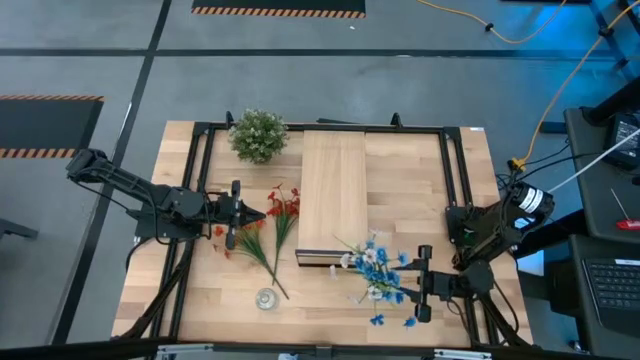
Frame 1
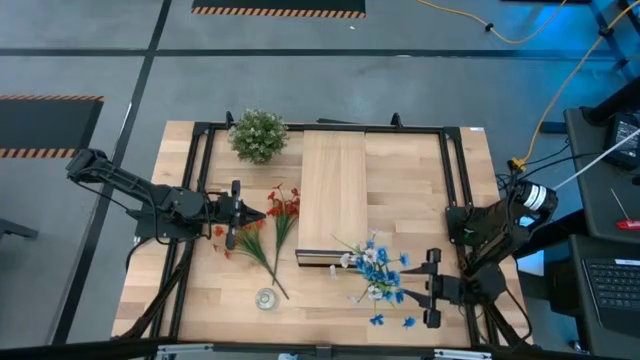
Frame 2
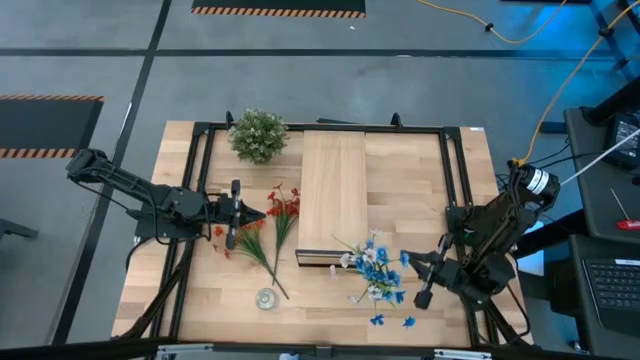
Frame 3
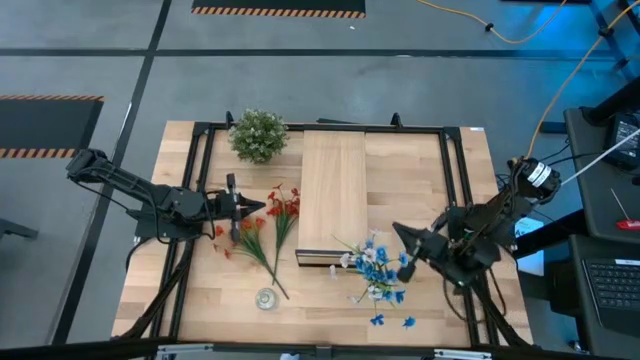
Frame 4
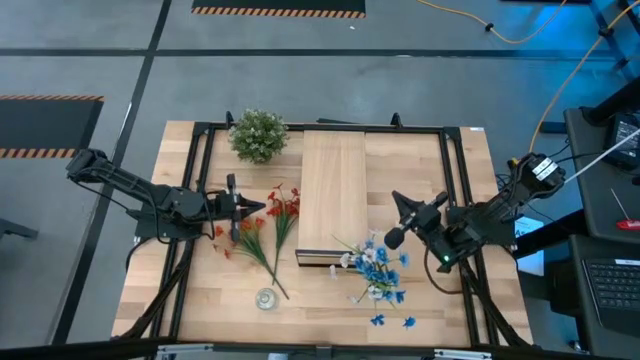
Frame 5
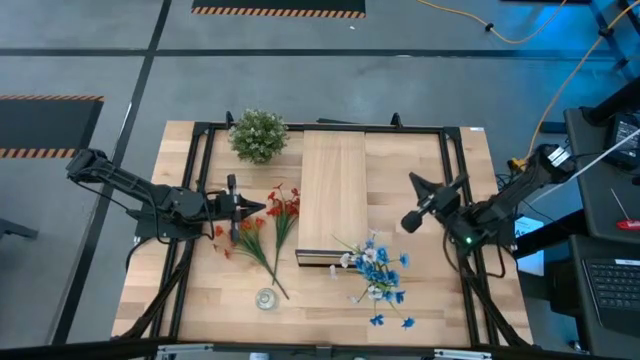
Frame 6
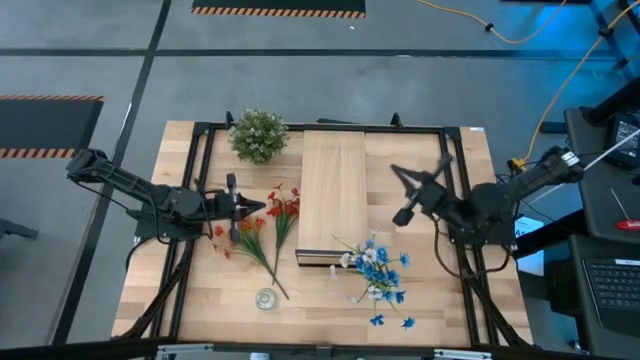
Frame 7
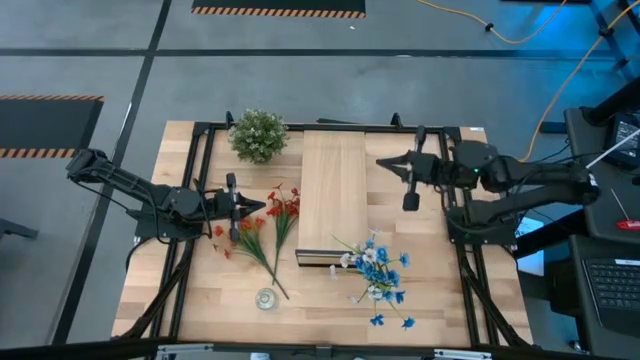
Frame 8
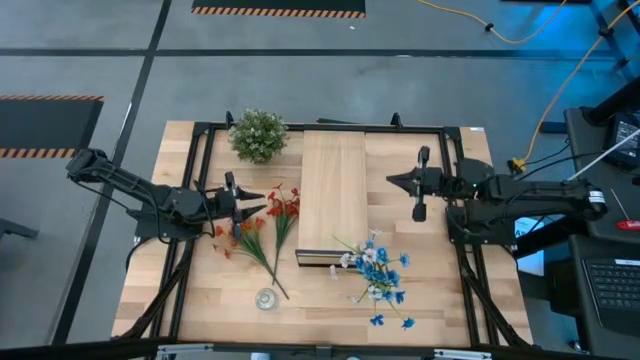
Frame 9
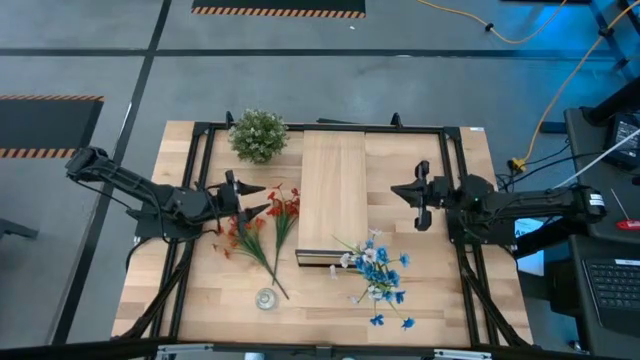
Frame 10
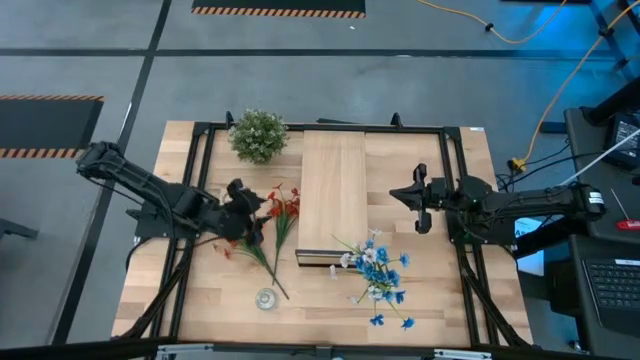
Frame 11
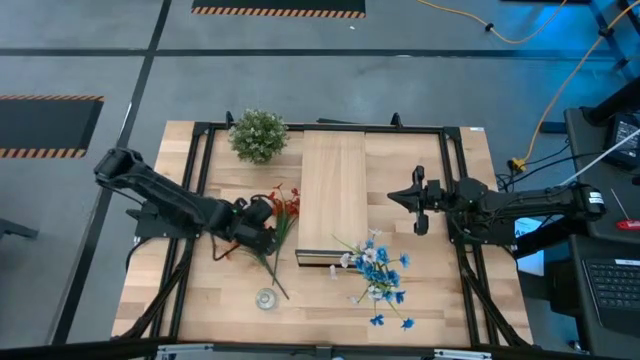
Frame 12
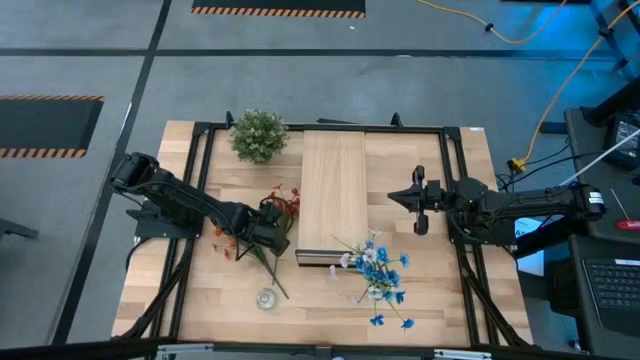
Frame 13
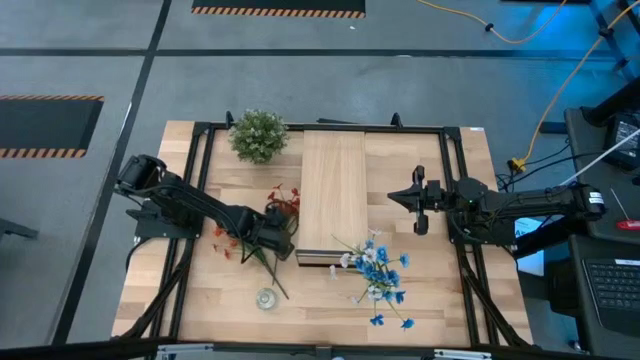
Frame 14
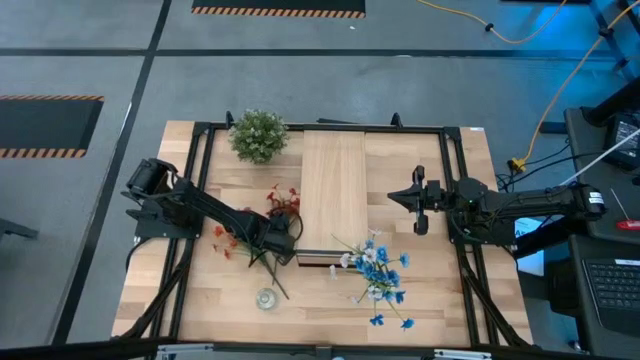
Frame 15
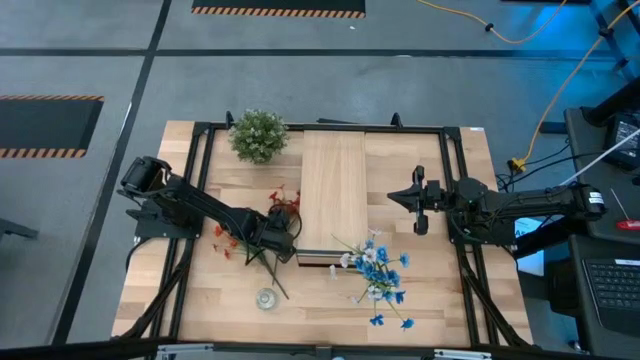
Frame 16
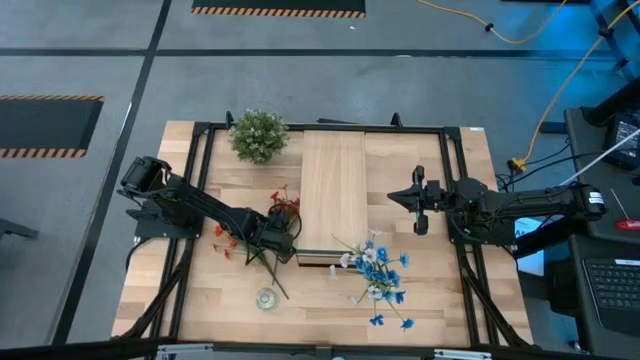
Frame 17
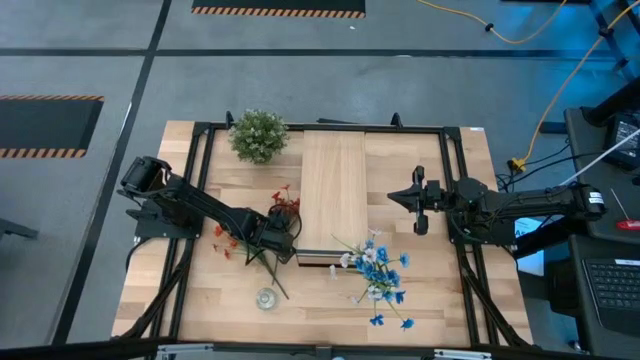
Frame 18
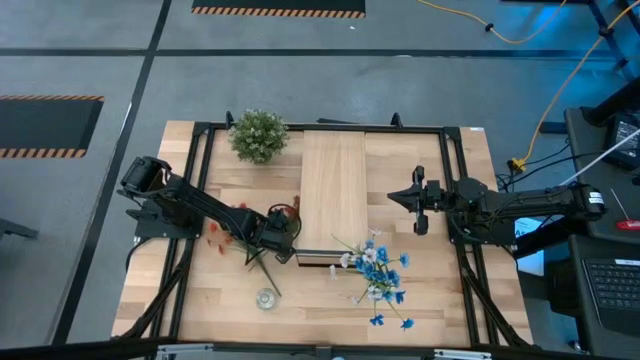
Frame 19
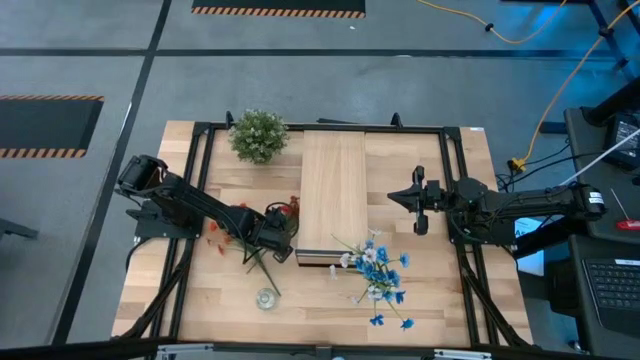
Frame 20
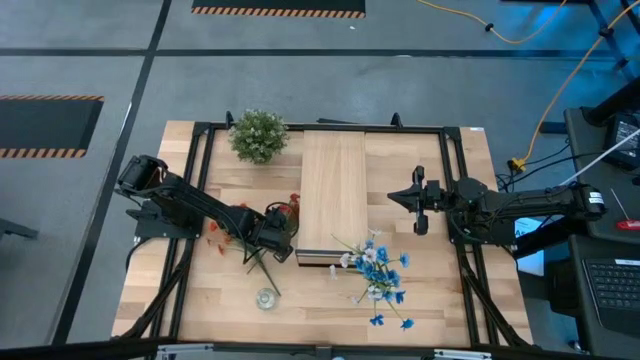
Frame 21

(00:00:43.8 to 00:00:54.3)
Task: Pick and place flowers into a vace then onto a shelf
Put the red flowers into the left transparent flower vase

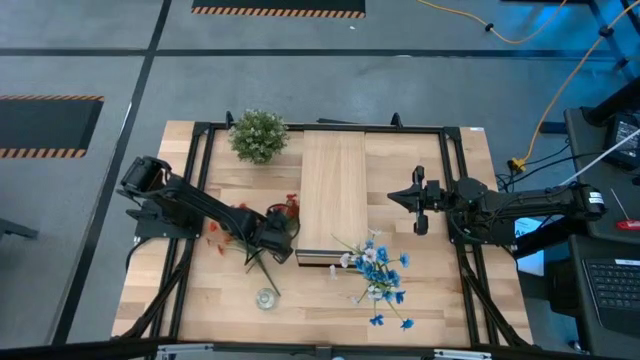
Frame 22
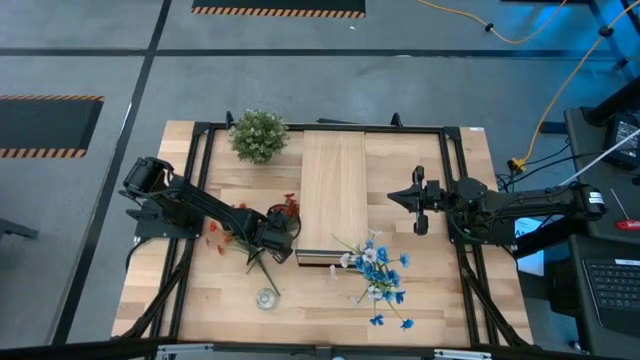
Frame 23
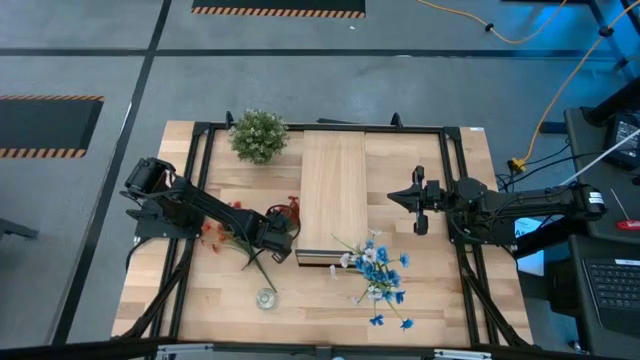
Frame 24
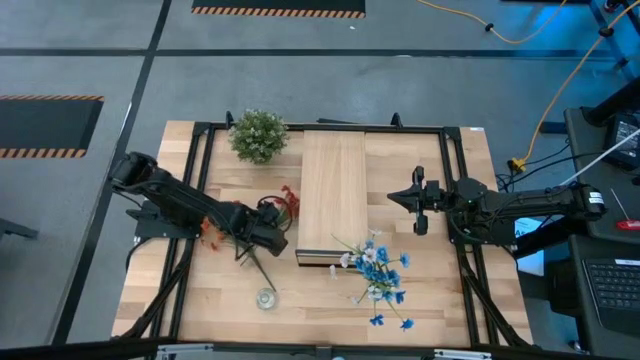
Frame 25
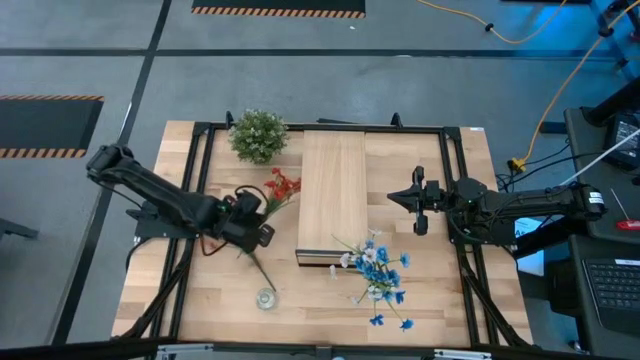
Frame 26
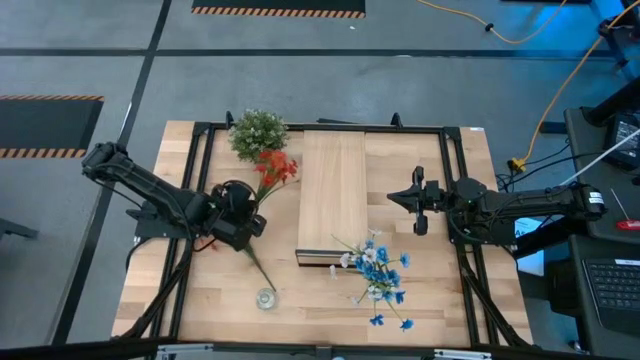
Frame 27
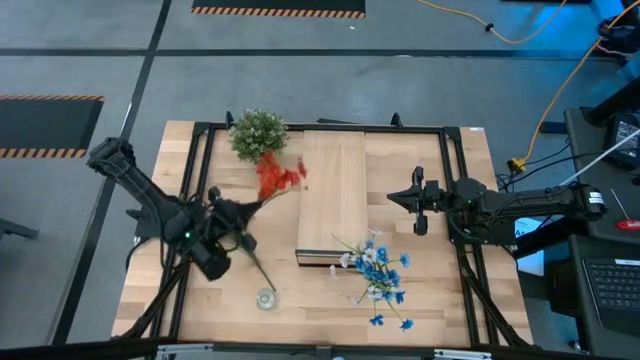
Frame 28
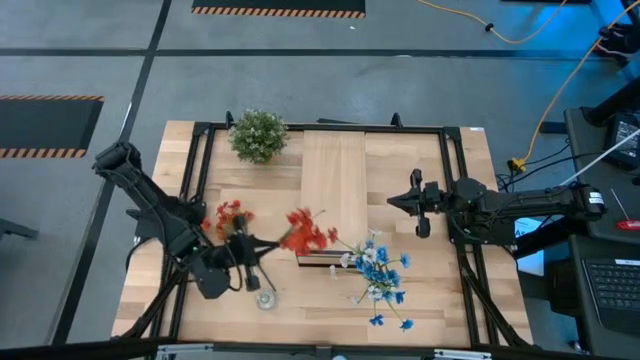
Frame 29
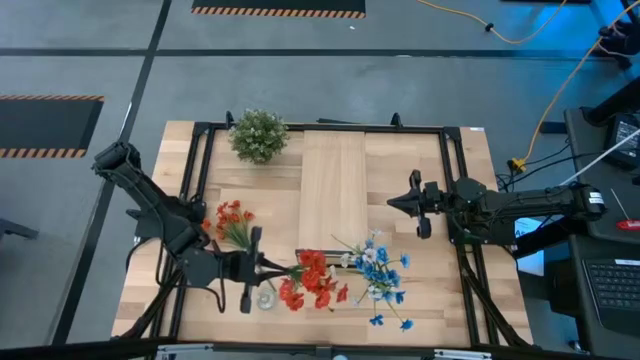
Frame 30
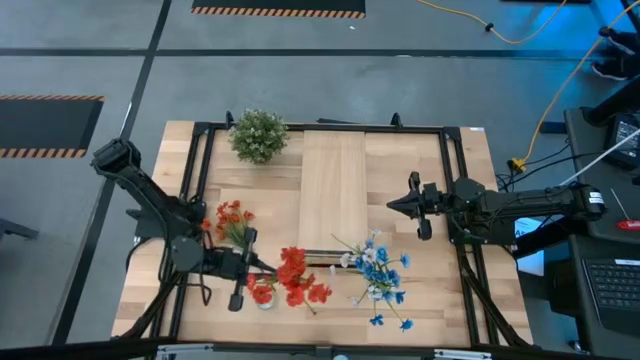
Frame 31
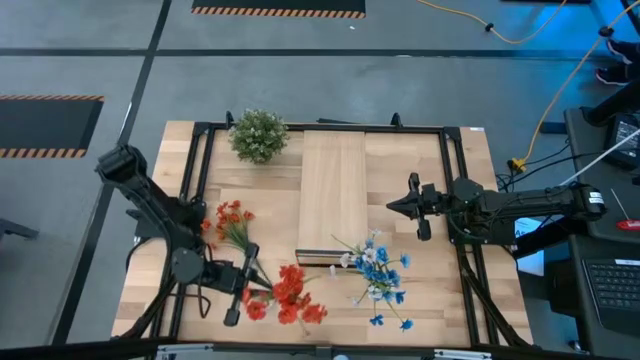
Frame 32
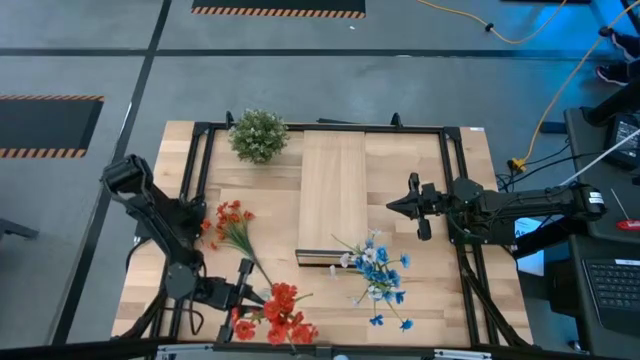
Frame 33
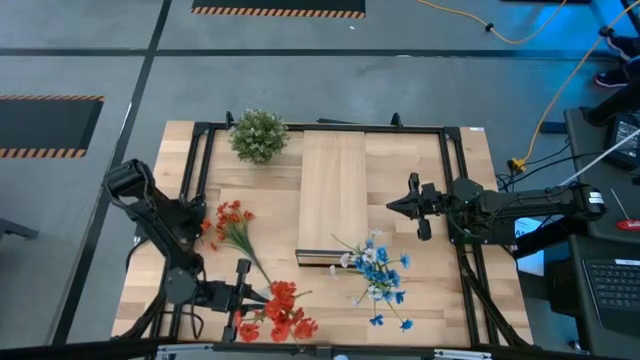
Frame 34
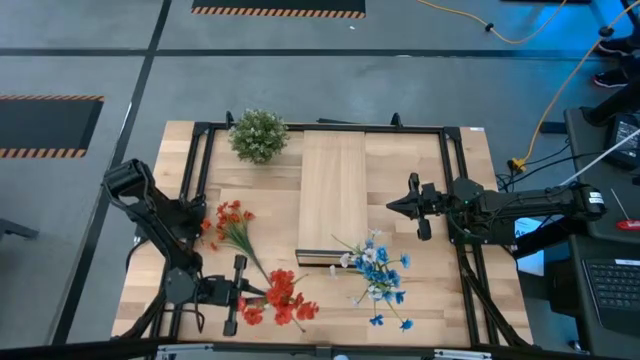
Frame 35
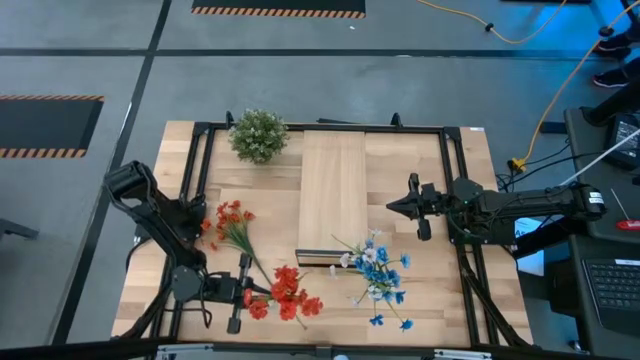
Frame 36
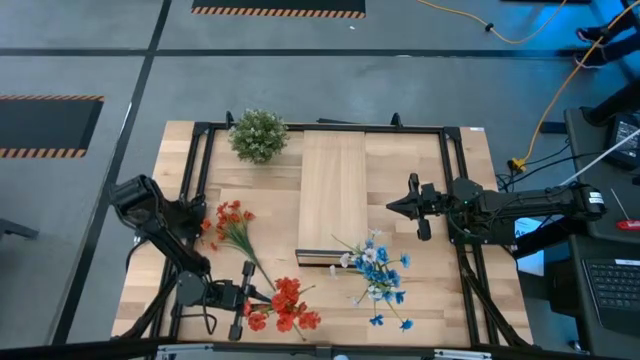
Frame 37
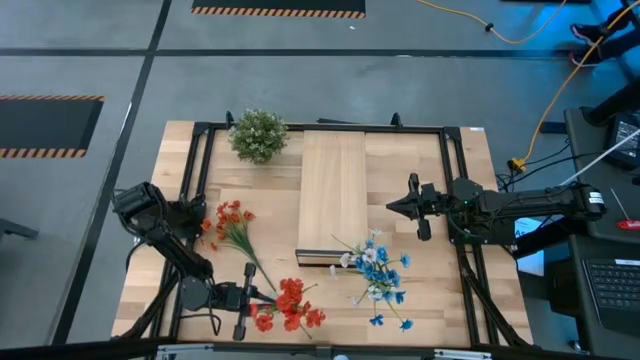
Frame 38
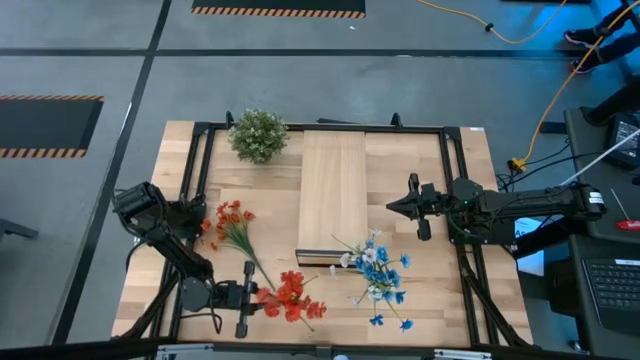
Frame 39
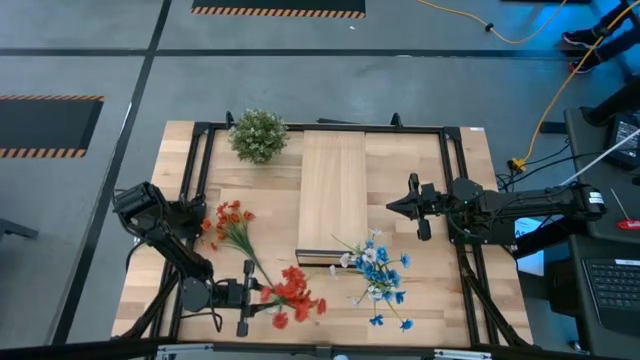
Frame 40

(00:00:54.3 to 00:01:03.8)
Put the red flowers into the left transparent flower vase

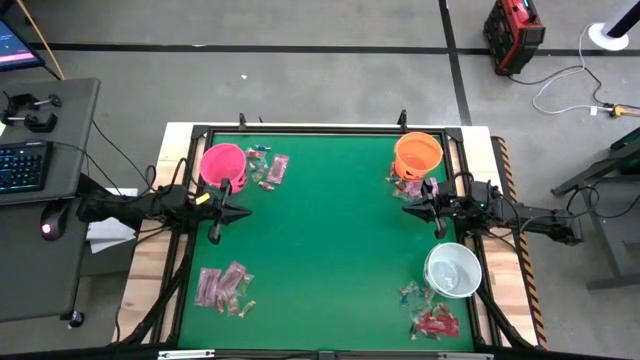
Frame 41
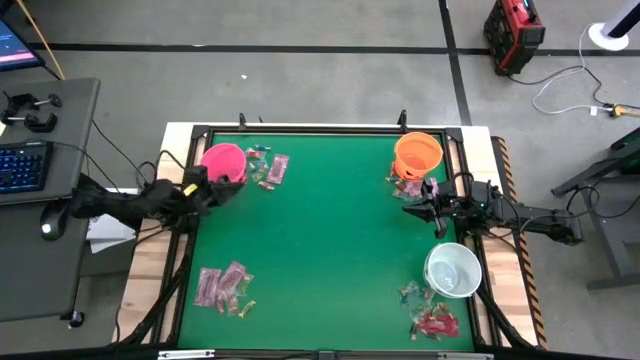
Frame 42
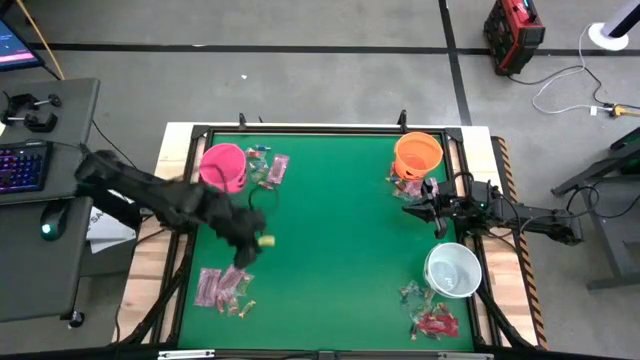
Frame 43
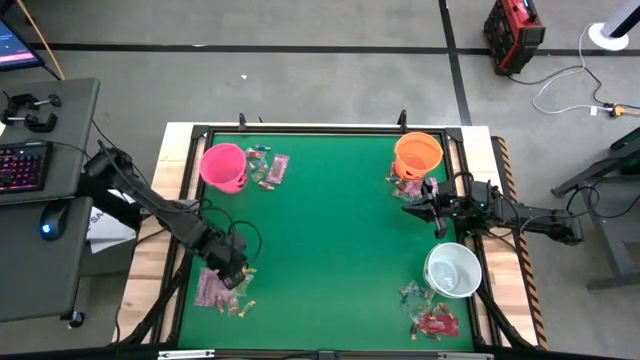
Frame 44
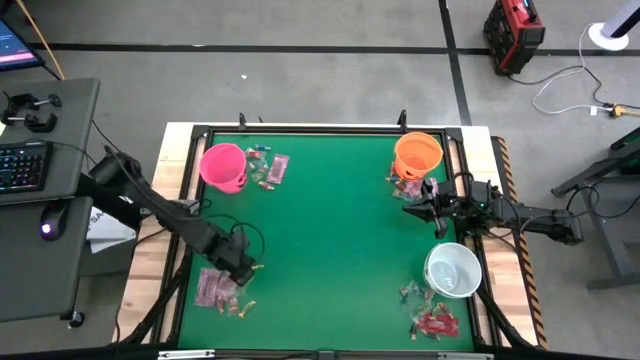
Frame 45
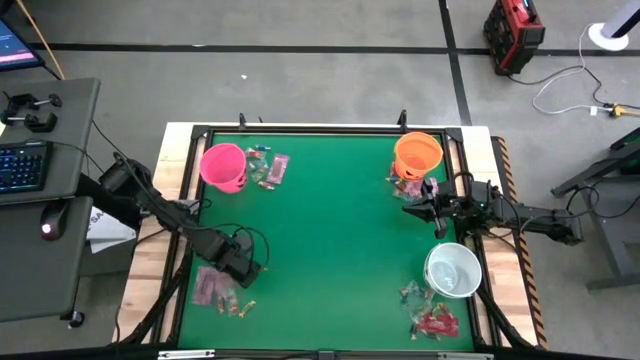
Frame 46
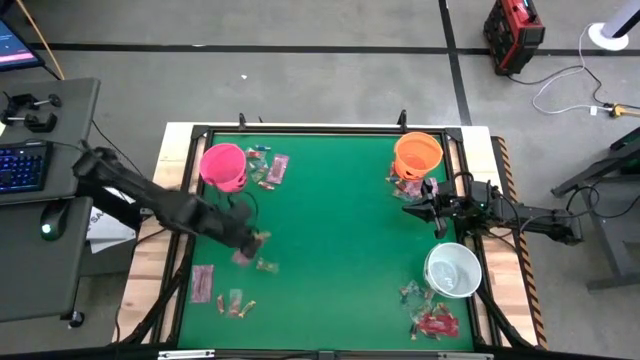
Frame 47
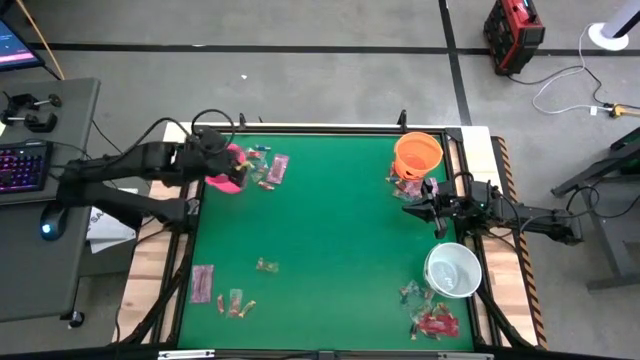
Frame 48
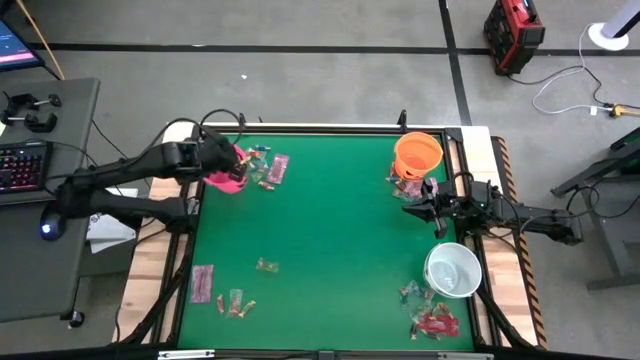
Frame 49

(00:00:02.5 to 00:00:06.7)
Task: Sort candy by brand, put in halloween buckets
Put the red candy into the pink bucket
